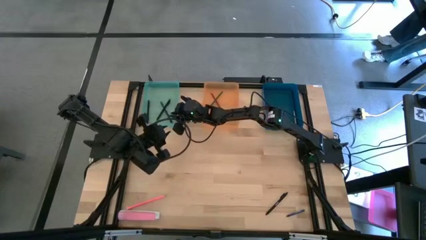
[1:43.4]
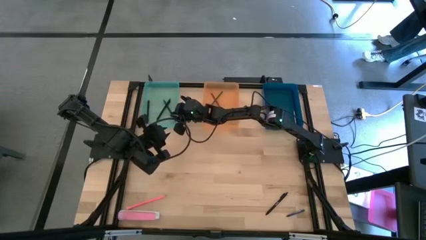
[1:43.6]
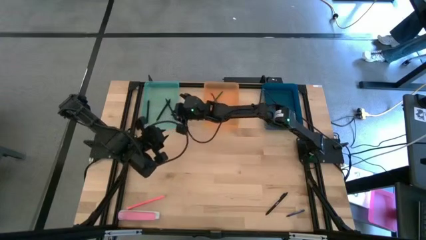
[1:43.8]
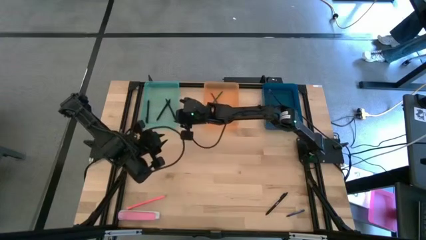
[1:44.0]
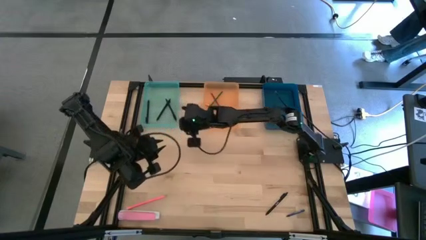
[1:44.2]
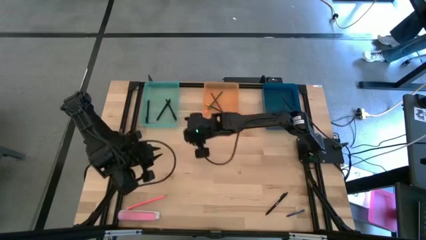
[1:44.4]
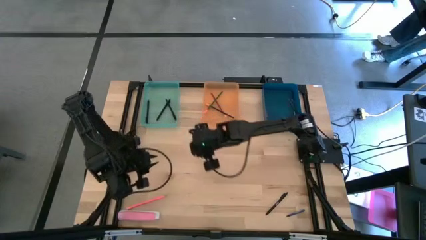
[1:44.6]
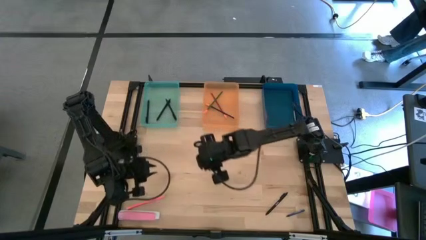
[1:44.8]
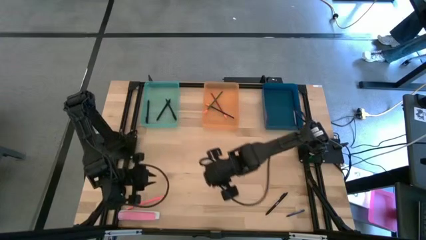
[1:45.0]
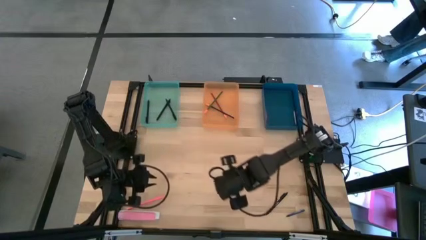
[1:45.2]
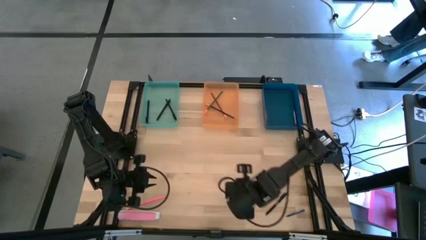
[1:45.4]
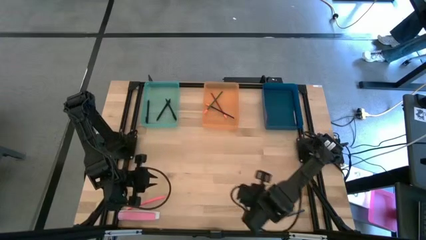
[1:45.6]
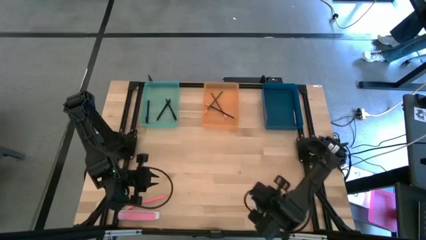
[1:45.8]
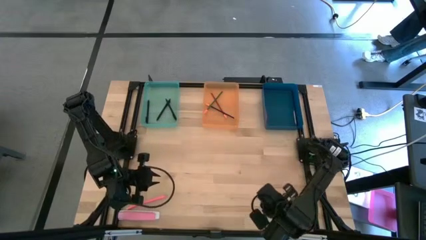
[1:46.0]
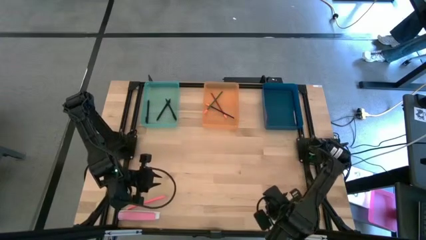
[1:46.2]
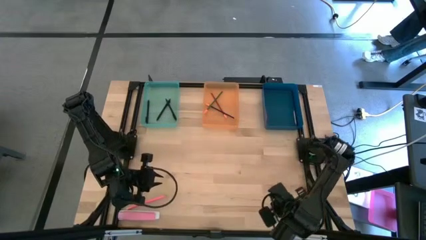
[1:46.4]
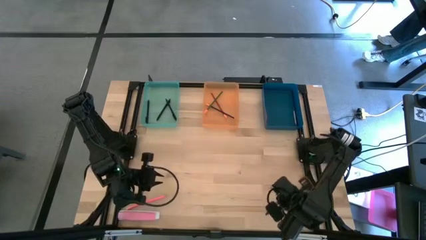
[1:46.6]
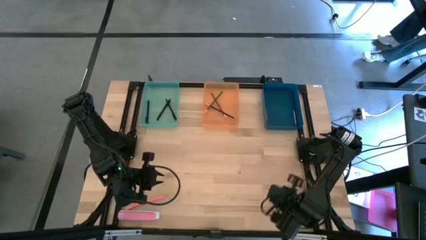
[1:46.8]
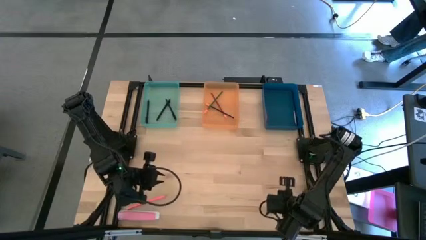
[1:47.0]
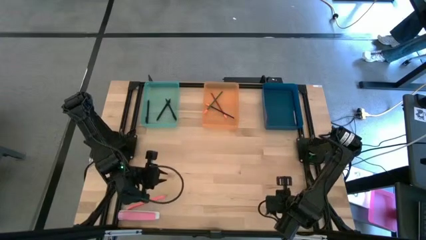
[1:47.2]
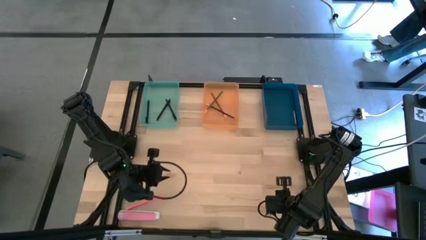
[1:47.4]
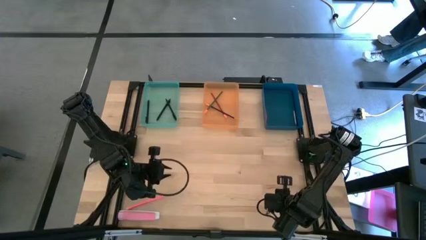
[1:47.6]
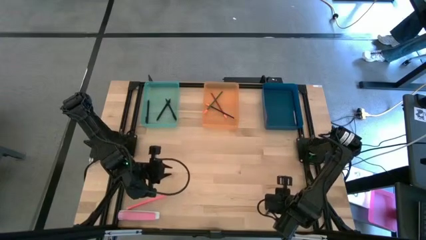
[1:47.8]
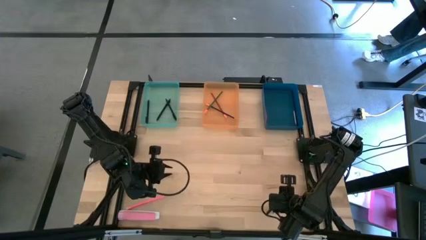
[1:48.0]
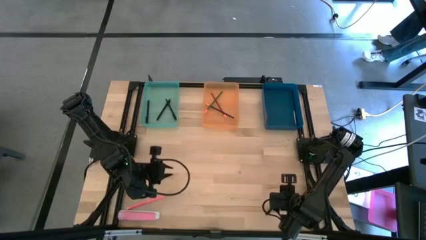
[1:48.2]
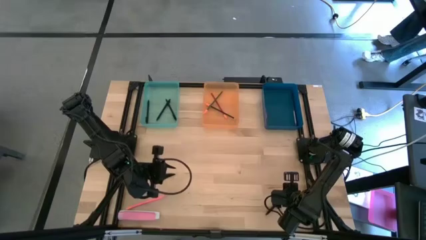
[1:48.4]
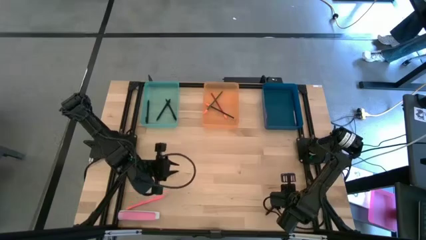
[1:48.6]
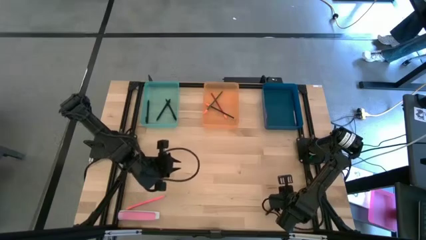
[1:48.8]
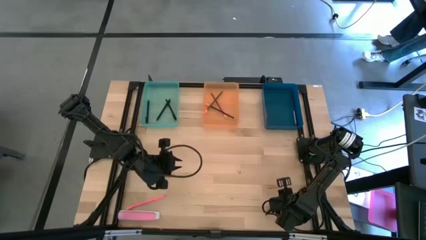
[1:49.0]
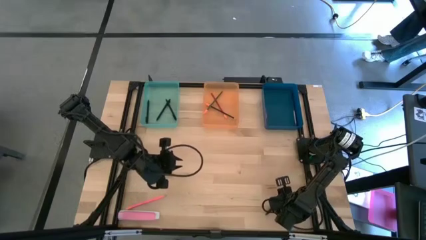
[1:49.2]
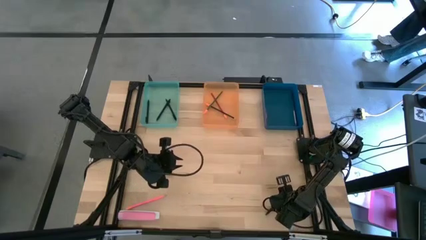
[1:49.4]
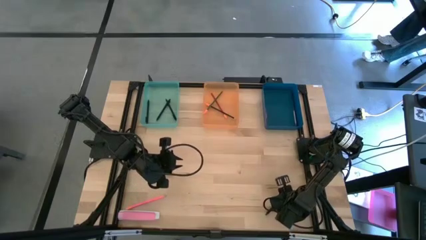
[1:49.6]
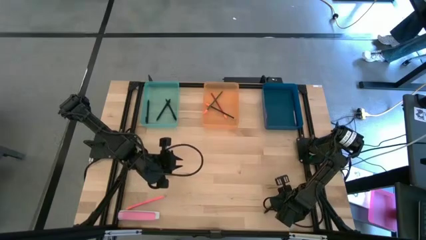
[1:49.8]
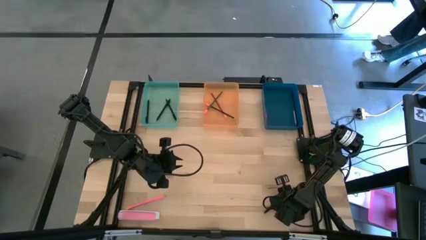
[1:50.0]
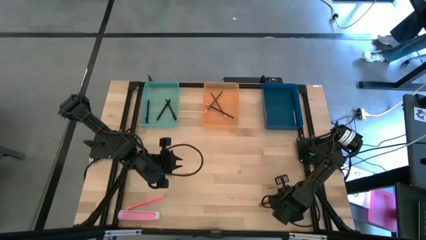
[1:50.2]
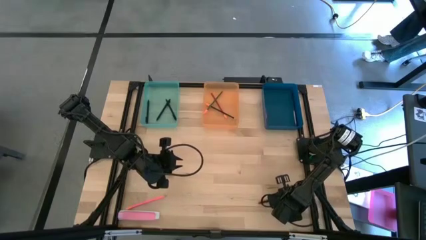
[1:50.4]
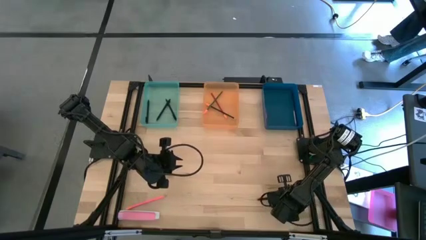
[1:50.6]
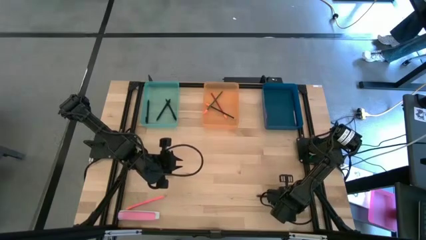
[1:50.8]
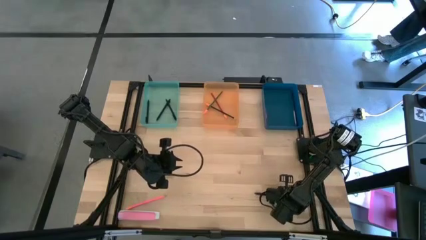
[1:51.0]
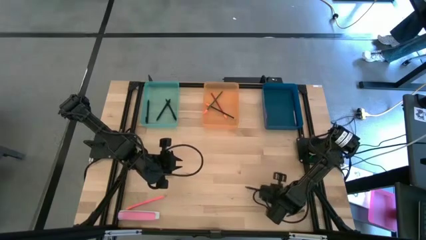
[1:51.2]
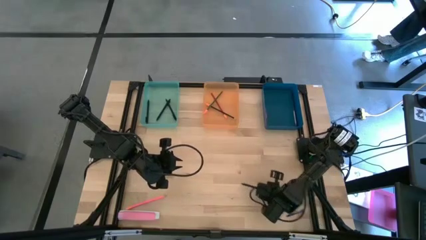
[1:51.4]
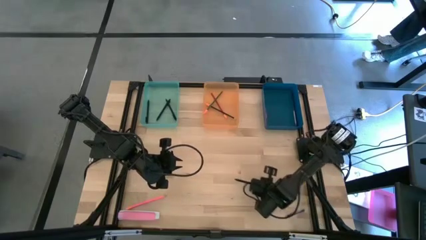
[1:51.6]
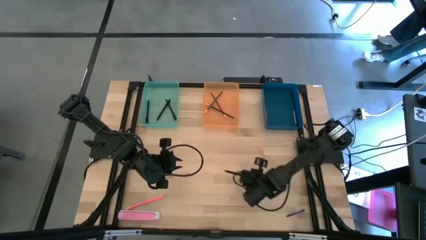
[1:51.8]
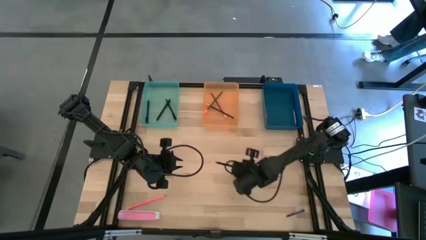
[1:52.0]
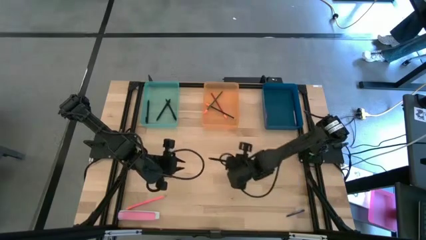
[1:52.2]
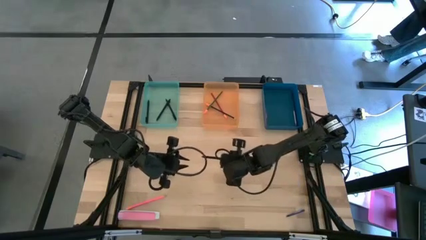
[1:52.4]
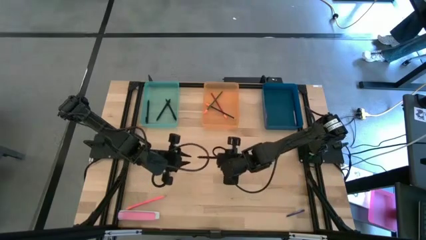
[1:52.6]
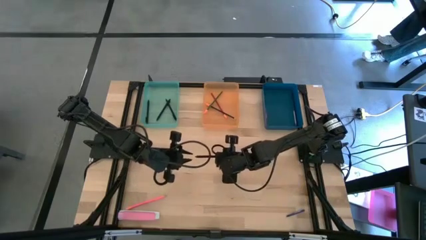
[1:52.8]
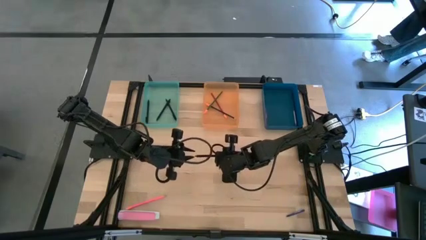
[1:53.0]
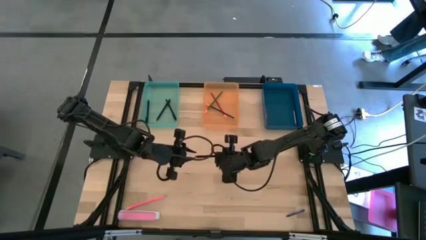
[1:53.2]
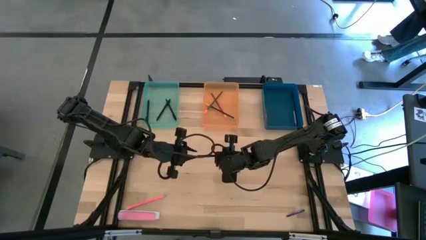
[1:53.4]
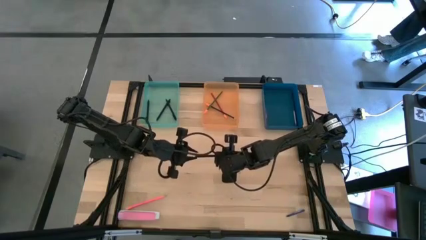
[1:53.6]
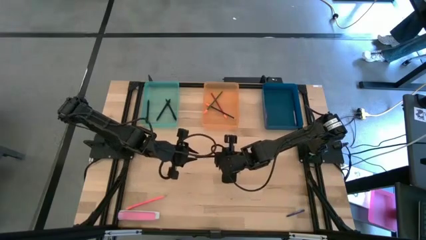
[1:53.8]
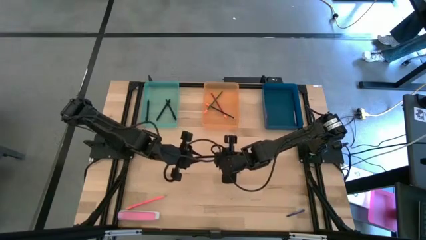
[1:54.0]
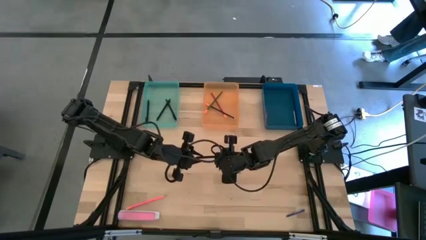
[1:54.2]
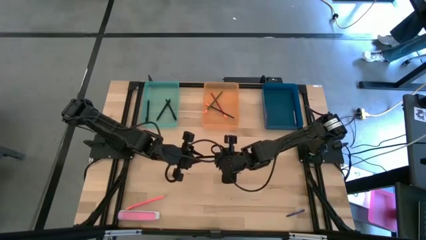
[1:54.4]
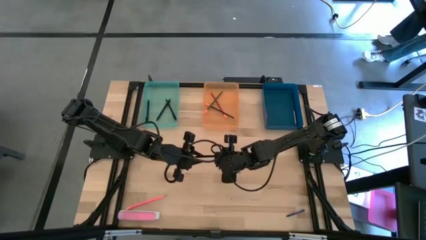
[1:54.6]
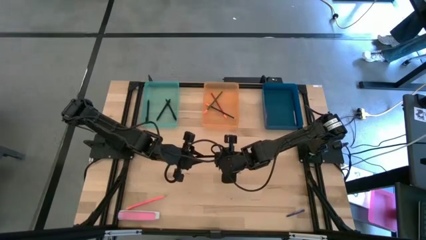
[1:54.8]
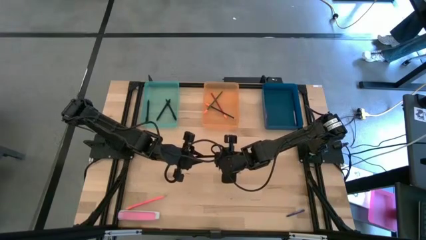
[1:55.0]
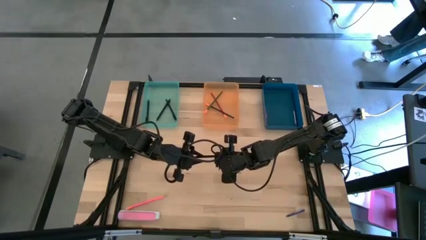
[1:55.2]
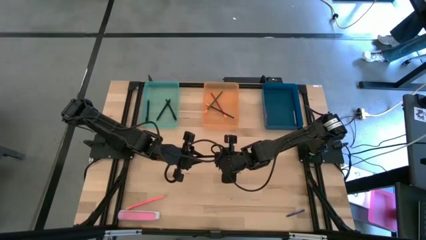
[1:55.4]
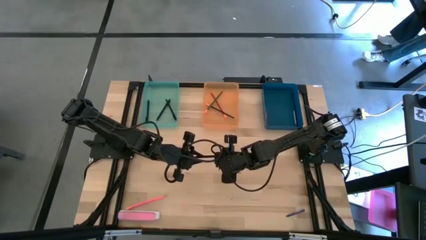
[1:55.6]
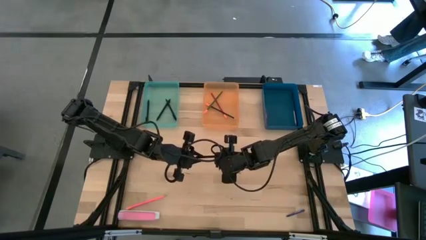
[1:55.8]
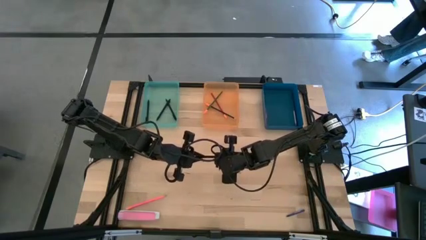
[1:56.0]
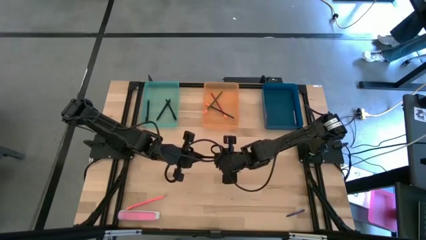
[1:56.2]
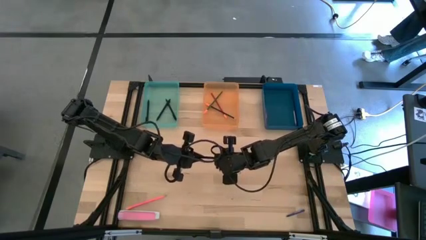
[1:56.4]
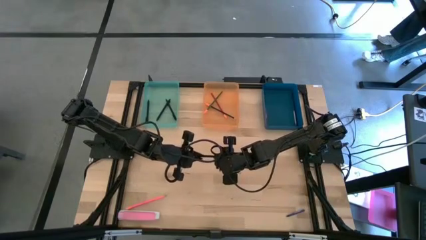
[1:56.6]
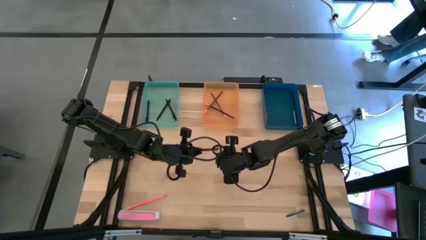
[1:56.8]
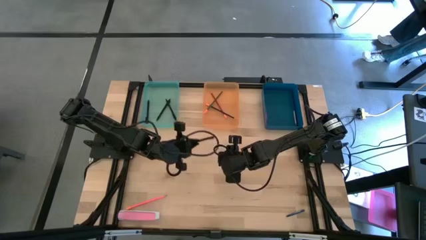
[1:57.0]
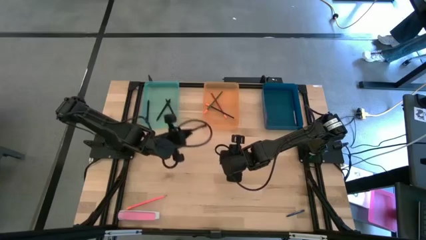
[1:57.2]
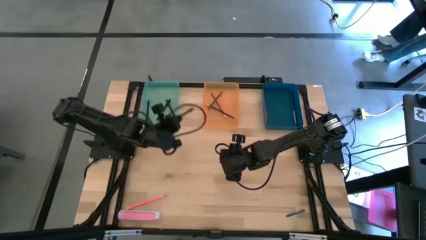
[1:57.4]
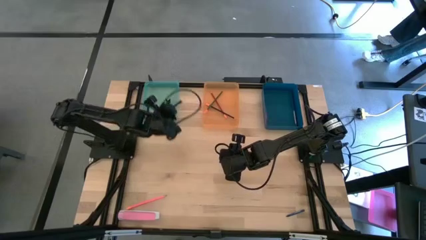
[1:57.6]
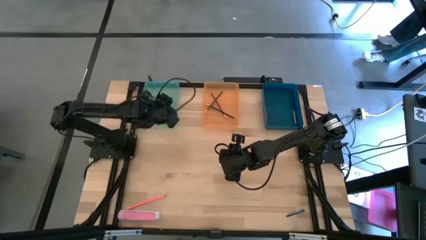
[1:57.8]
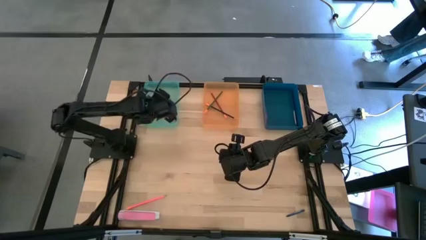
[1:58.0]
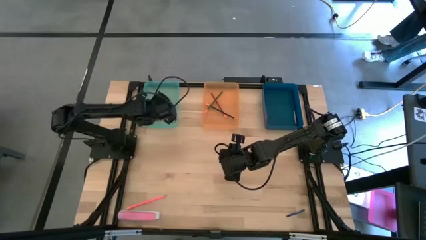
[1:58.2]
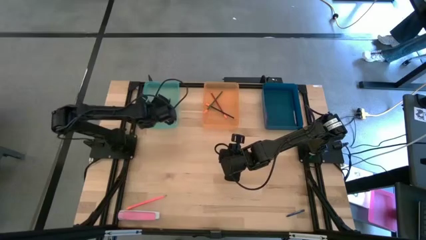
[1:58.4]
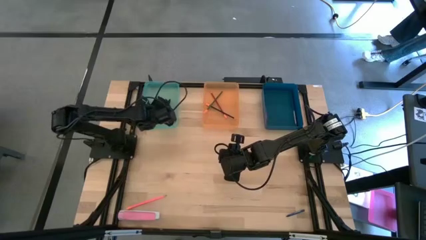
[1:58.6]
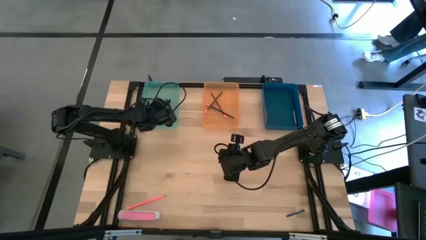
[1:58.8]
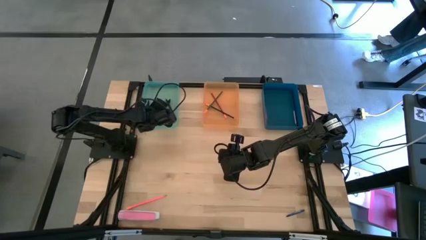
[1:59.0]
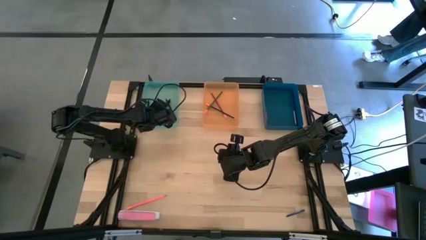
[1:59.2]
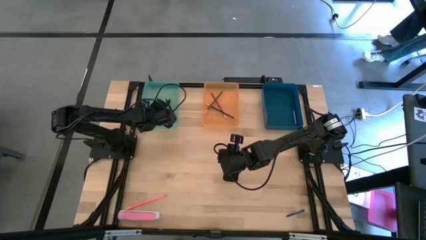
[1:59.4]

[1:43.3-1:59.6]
Task: Sort crayons/erasers/pens/pencils in bins
Put the black pen into the green bin
